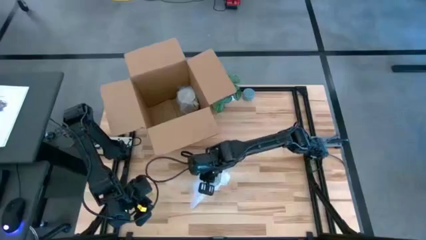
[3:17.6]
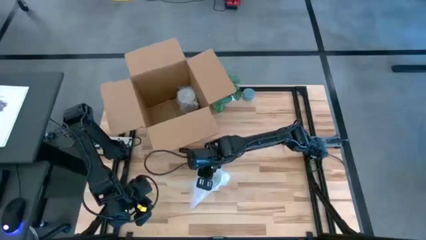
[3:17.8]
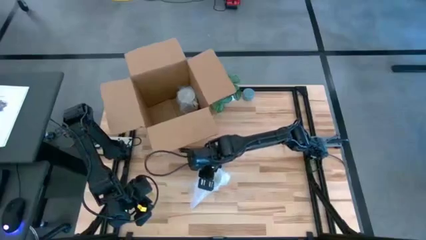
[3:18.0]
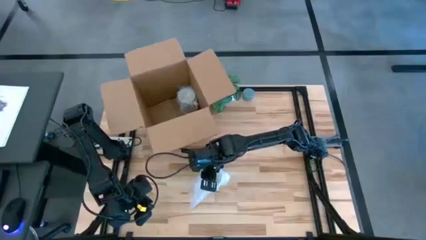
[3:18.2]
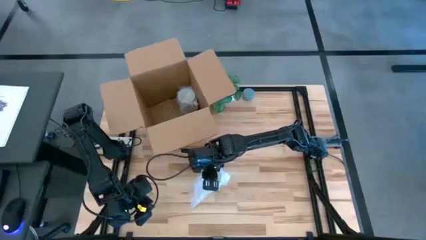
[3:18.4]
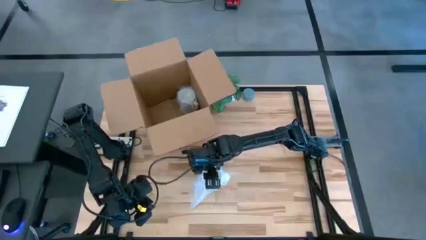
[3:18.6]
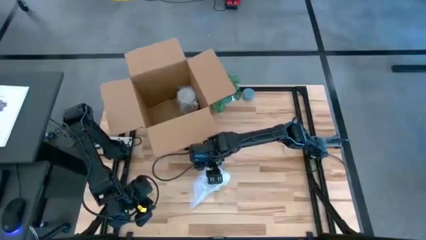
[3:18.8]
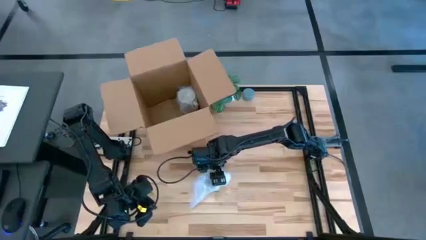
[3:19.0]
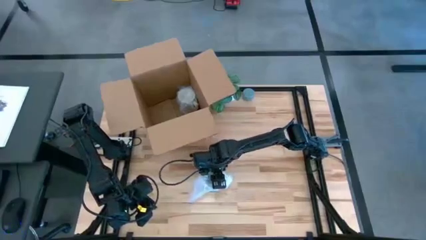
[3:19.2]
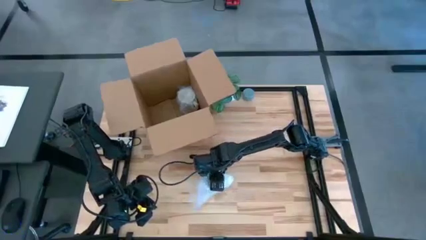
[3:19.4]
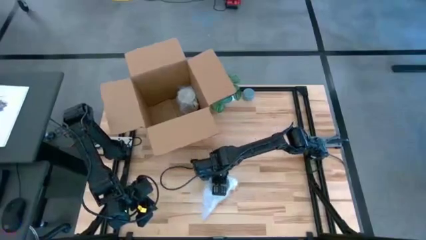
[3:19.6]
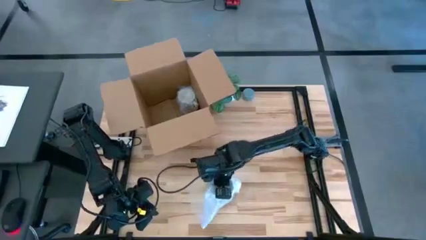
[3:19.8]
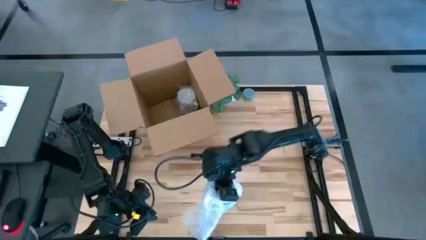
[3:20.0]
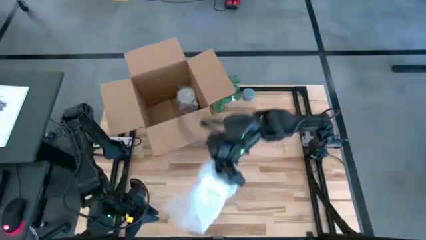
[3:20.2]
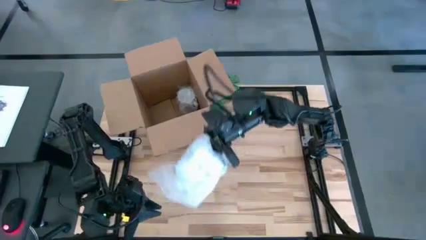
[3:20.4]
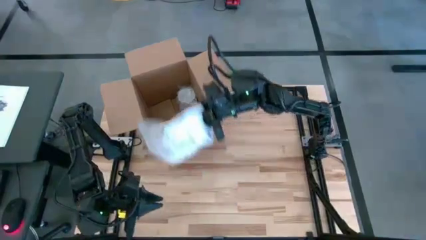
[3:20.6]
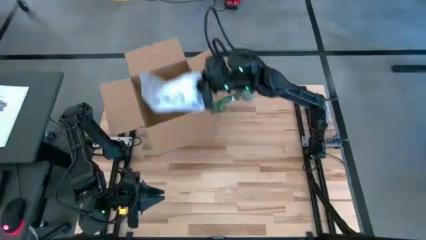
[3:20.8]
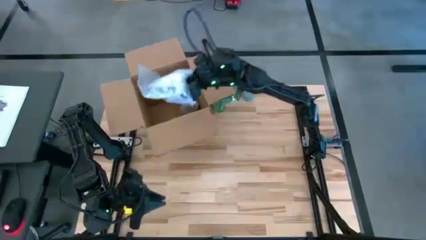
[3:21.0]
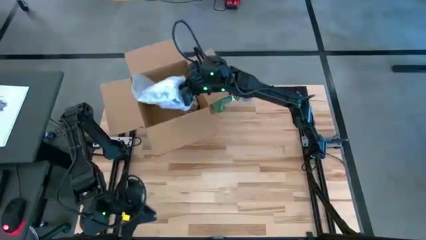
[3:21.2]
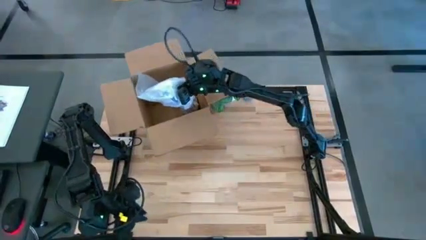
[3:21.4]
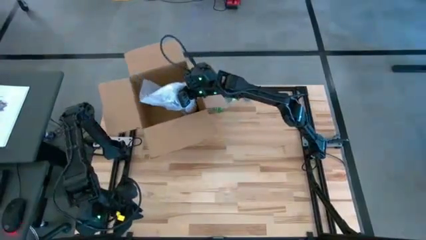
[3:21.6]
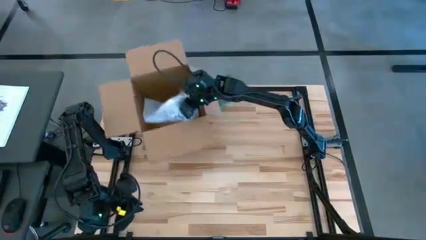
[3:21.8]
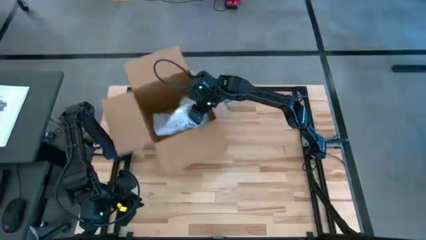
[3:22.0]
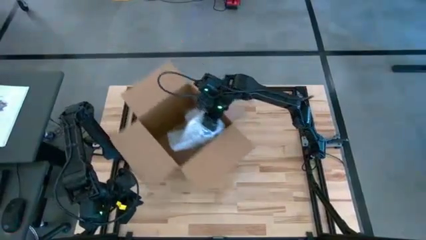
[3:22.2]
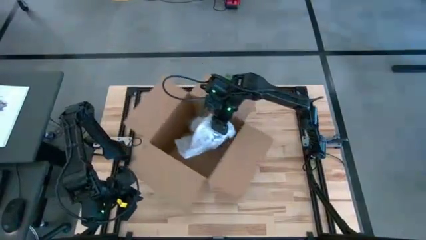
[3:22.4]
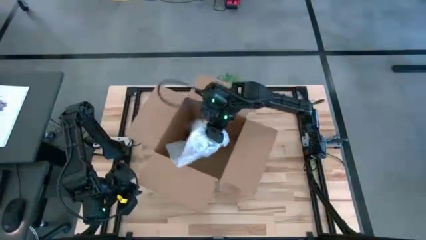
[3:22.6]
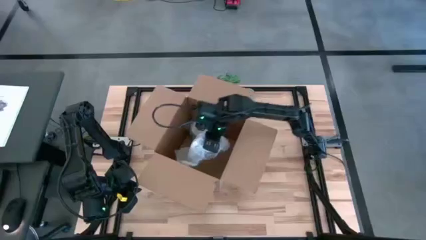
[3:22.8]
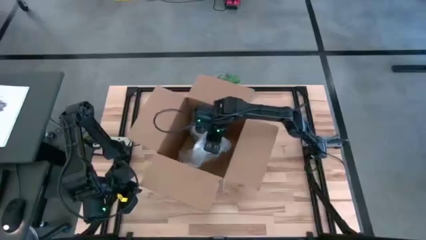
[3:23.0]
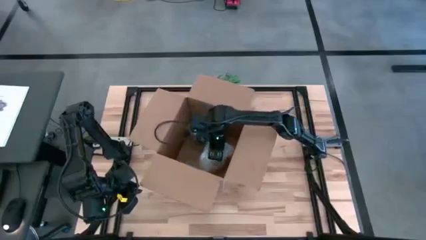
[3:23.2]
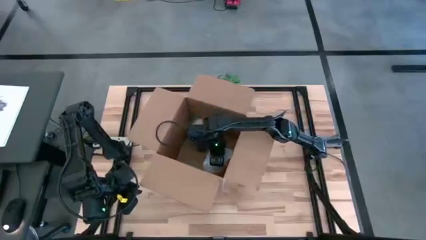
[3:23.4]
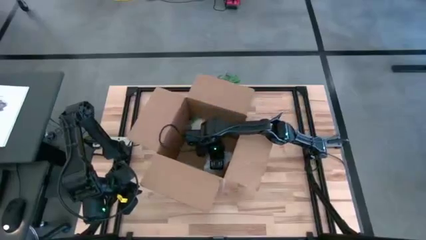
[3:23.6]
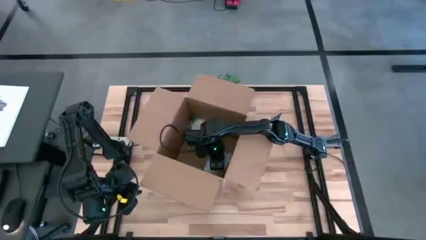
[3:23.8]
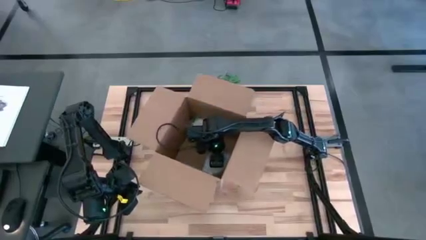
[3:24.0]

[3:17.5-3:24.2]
Task: wrap mug
Put the wrapped blue mug into the box

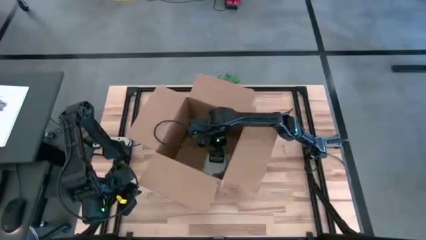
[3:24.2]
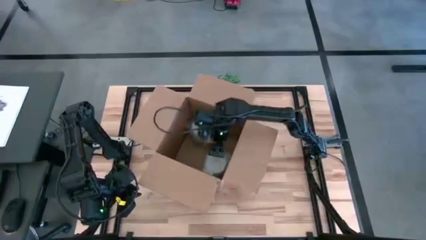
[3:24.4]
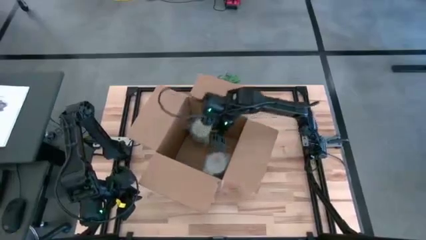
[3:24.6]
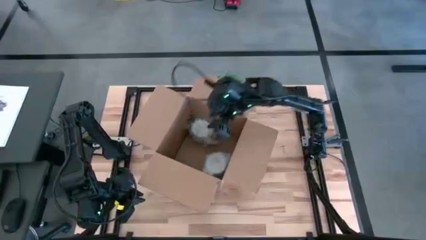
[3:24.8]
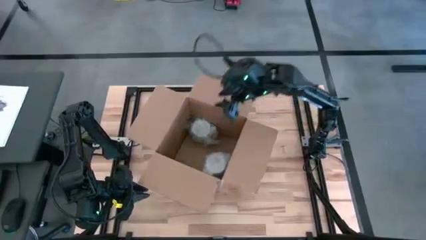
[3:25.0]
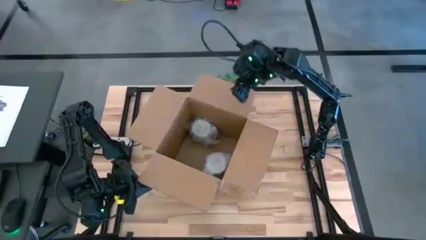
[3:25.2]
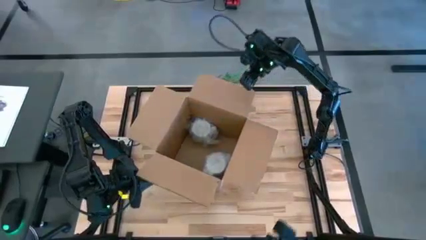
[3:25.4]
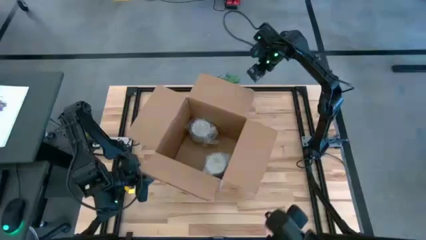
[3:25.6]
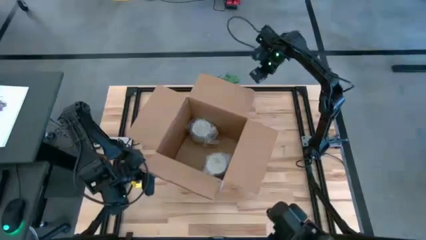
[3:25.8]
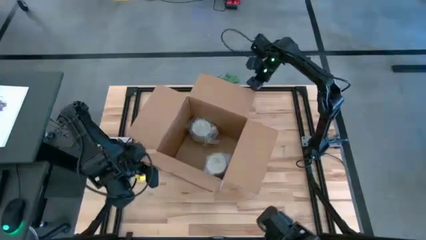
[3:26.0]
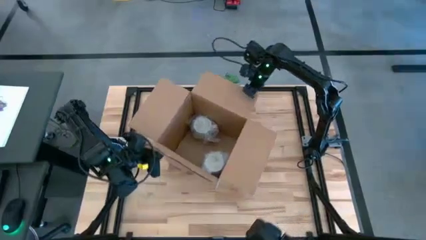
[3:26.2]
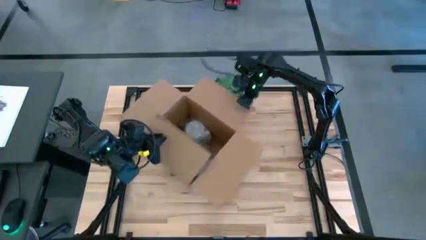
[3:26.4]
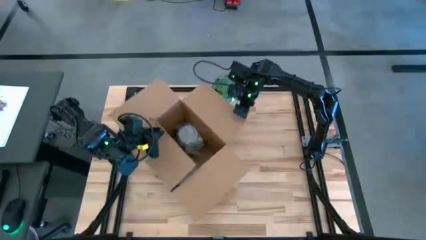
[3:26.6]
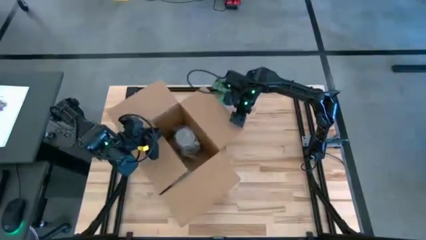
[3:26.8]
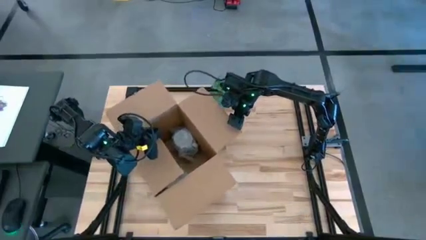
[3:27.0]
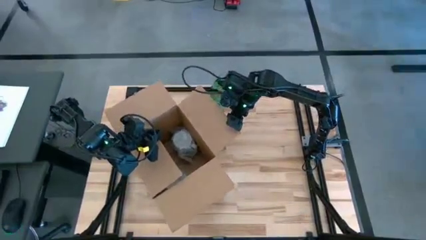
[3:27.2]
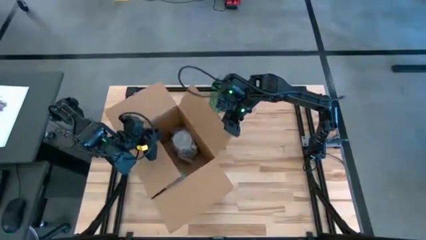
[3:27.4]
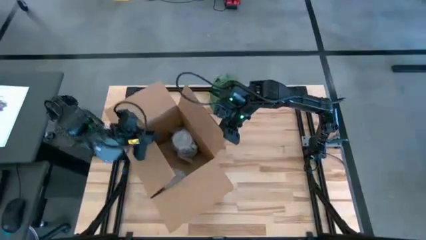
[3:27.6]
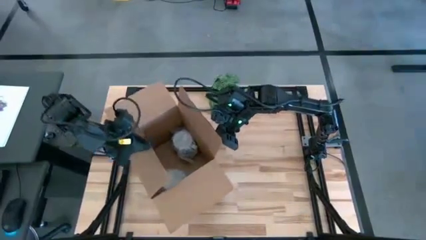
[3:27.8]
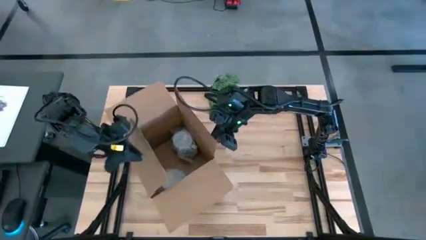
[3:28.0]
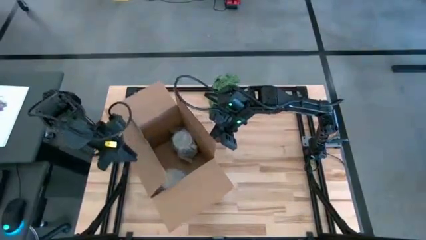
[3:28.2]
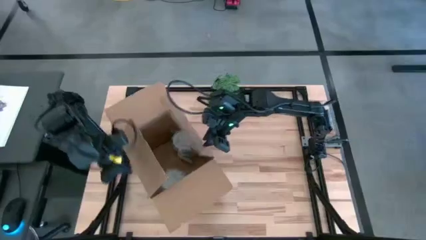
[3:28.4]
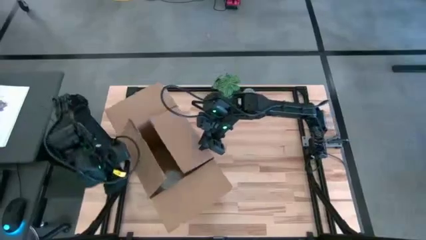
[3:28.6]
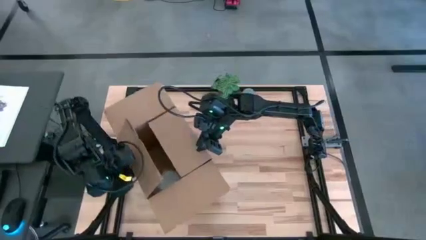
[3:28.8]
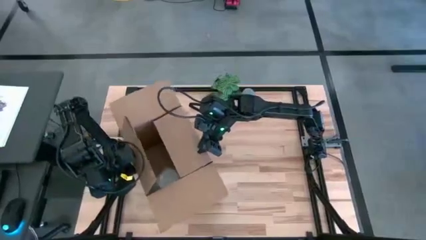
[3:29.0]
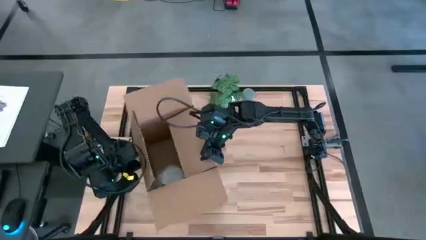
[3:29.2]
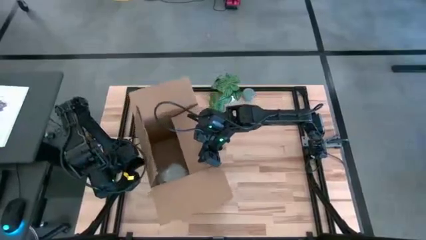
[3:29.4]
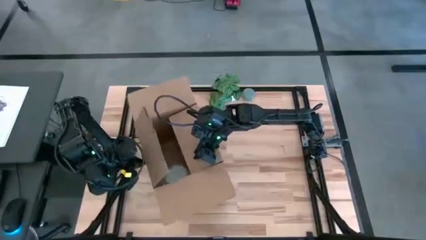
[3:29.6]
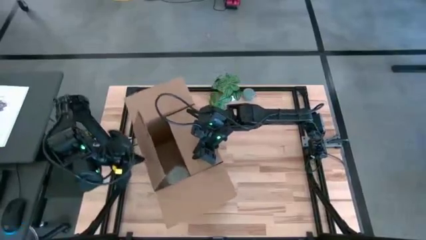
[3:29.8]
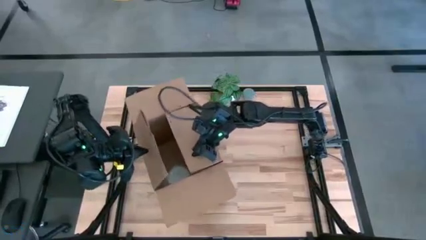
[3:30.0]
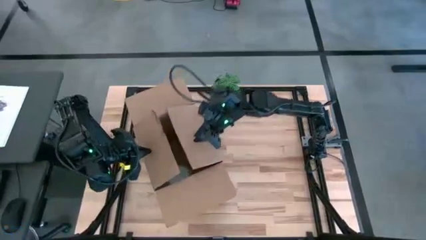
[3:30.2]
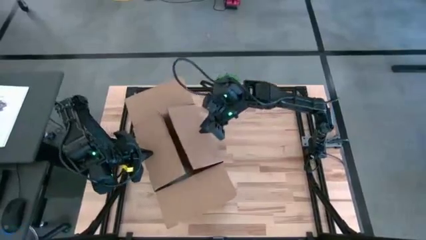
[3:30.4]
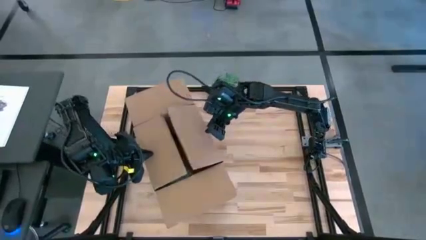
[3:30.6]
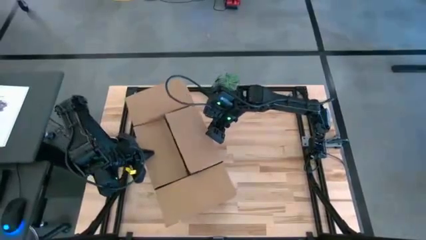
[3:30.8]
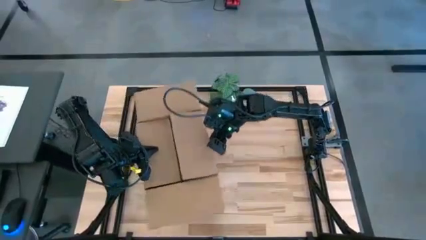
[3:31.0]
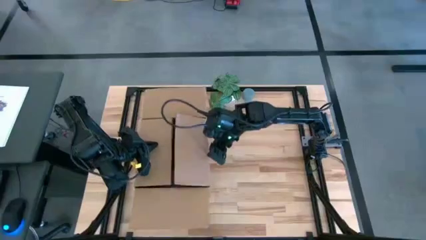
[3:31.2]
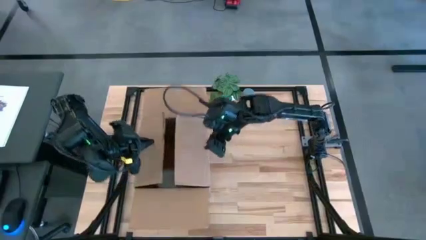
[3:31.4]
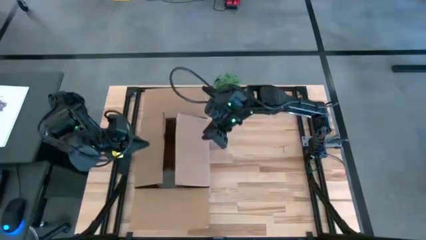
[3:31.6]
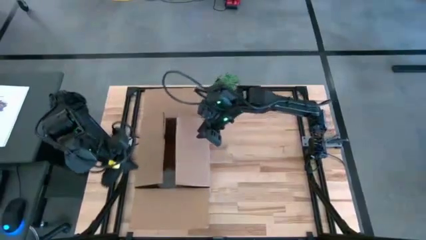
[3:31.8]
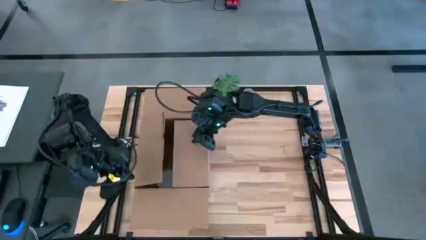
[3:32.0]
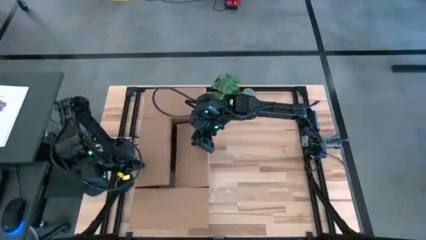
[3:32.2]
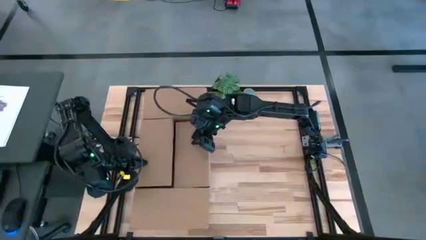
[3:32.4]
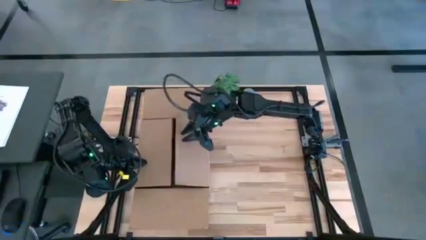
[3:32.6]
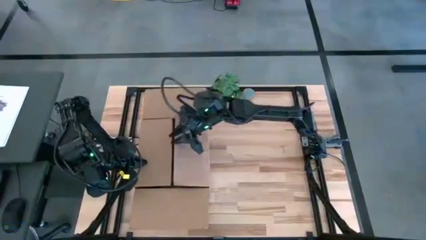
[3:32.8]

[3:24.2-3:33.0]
Close the box

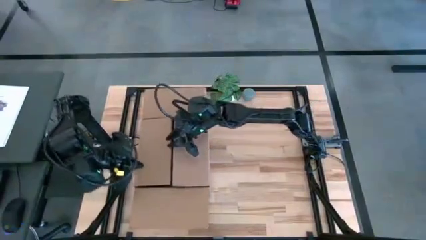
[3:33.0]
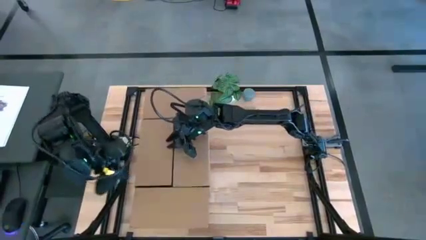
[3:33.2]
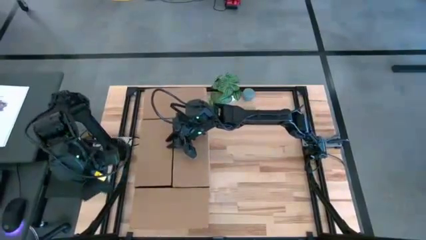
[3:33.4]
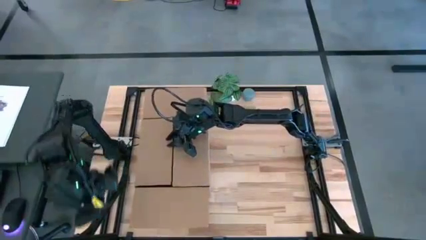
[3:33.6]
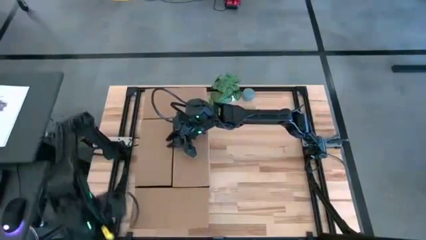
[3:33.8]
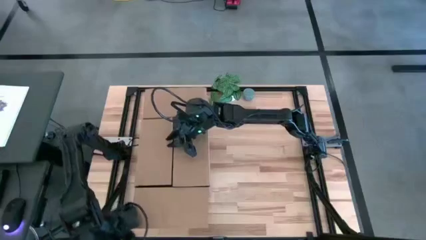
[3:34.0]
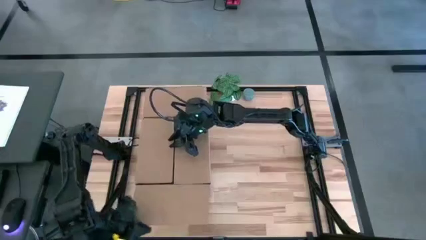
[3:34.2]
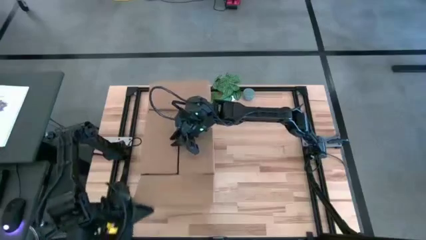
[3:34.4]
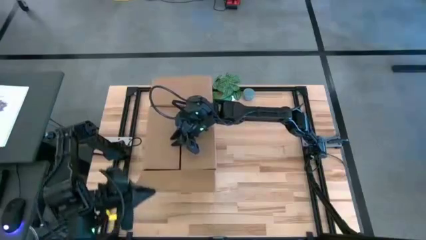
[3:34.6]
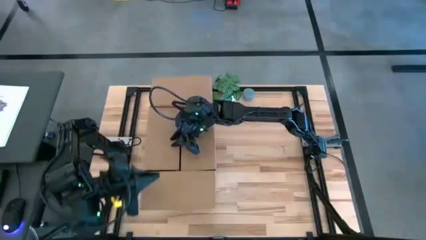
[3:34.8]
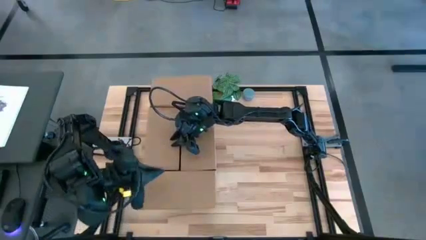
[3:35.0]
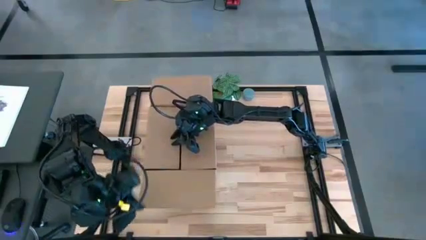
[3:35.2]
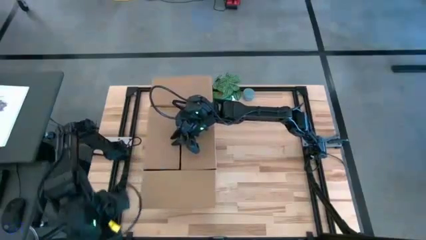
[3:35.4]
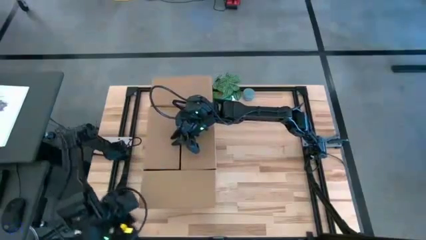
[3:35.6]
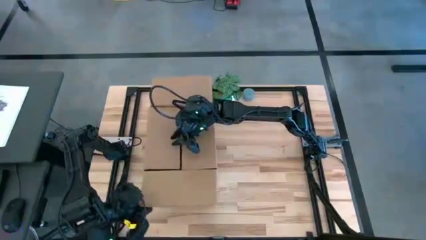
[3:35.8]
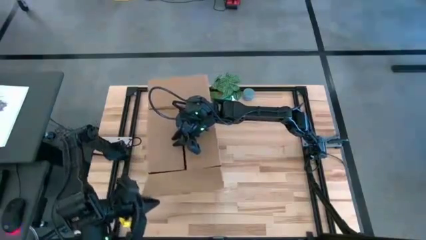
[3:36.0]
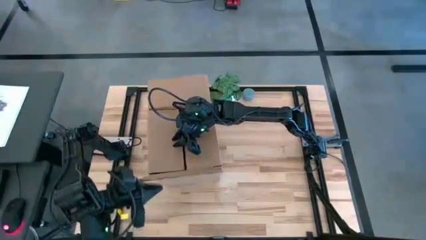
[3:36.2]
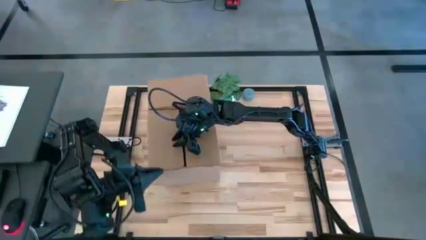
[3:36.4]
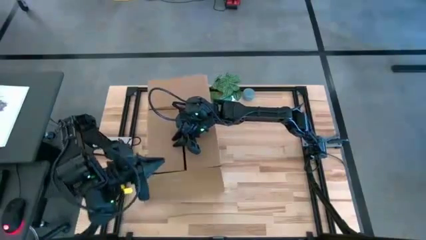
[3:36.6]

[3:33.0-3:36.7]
Close the box
